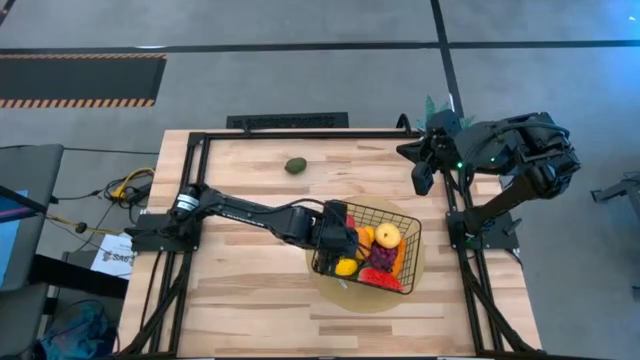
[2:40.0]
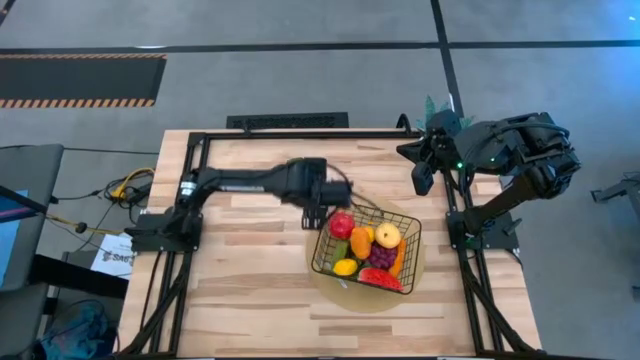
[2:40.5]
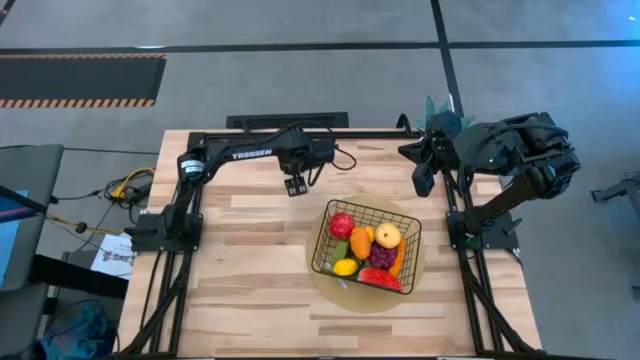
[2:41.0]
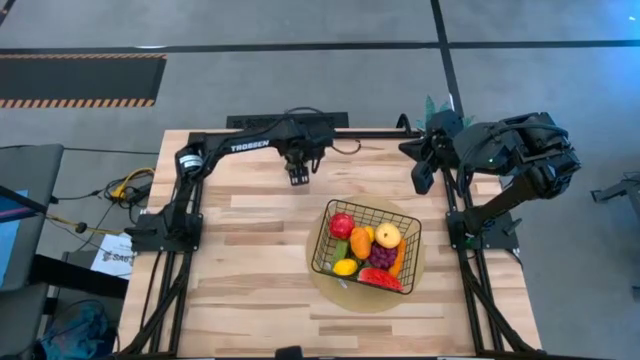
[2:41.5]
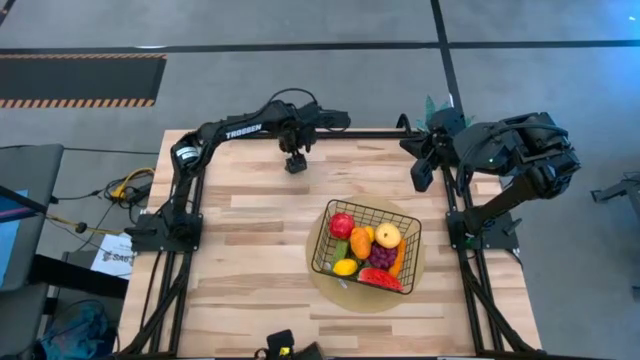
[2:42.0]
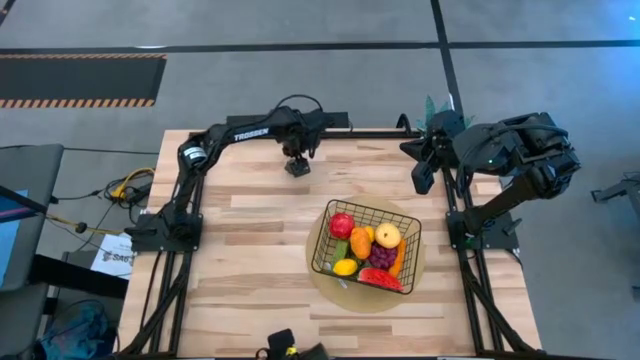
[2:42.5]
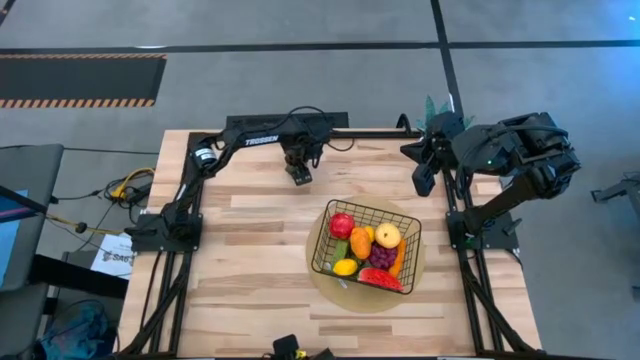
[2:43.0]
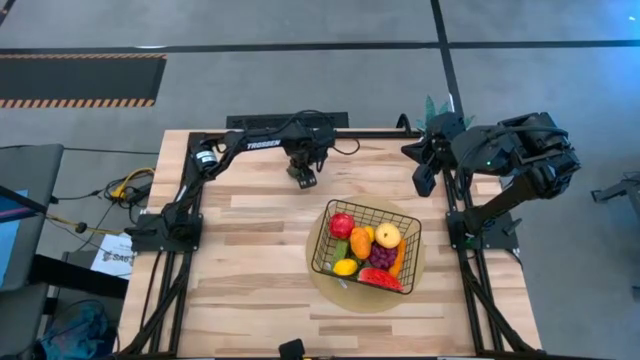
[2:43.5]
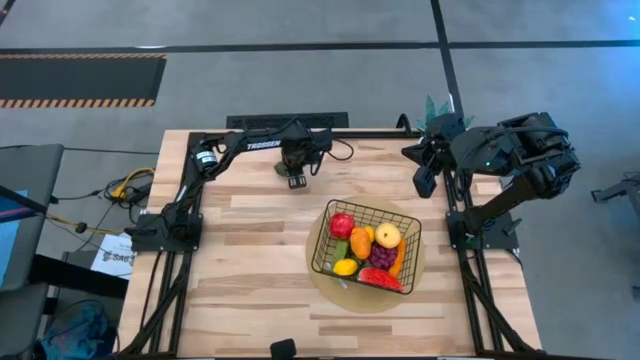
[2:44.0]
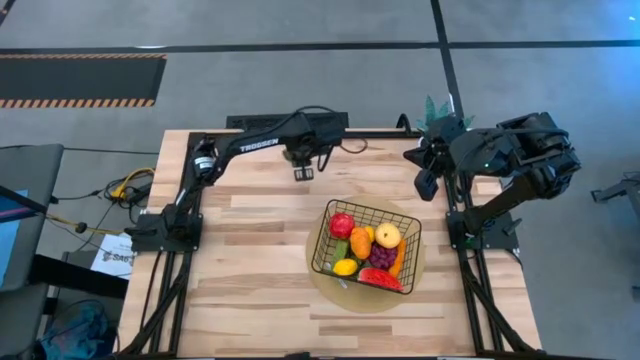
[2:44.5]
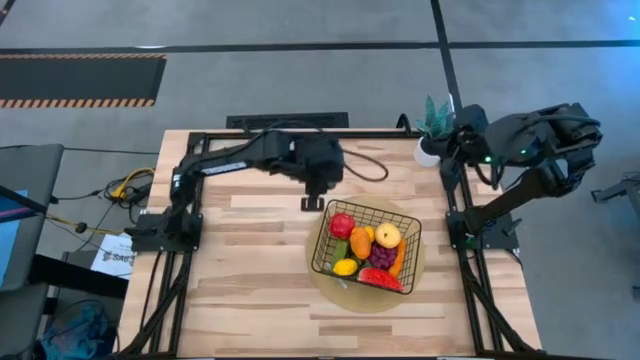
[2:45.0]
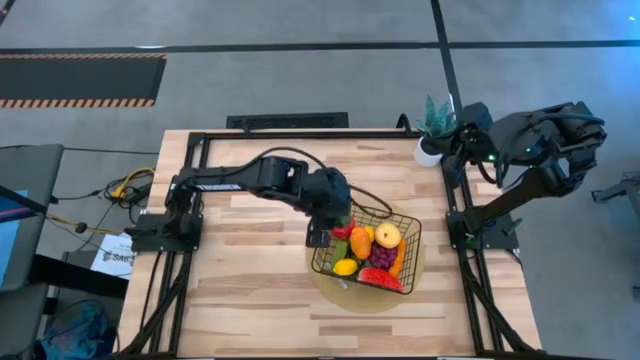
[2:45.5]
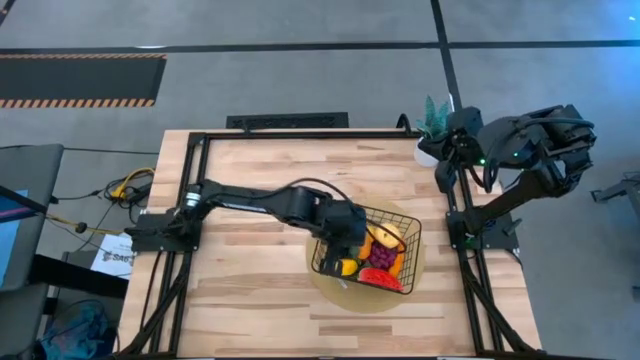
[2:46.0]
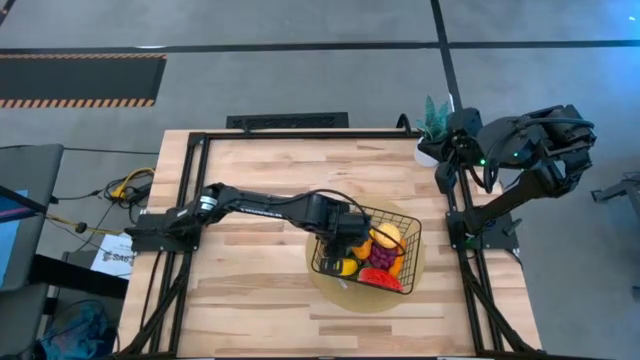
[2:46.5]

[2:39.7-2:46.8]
Task: Build produce basket
Put the lime into the mesh basket

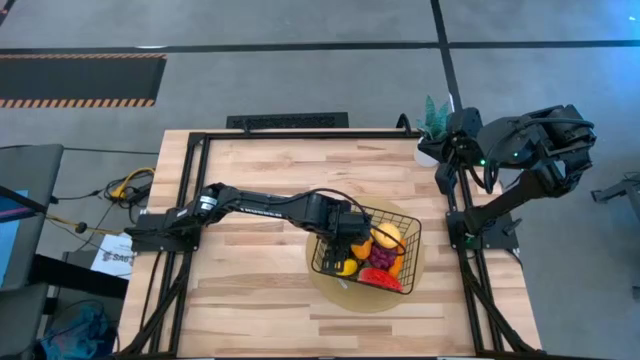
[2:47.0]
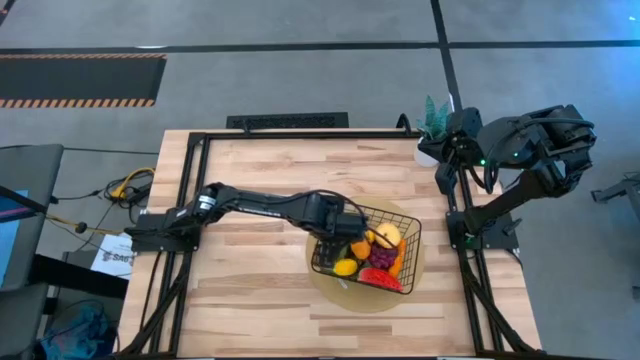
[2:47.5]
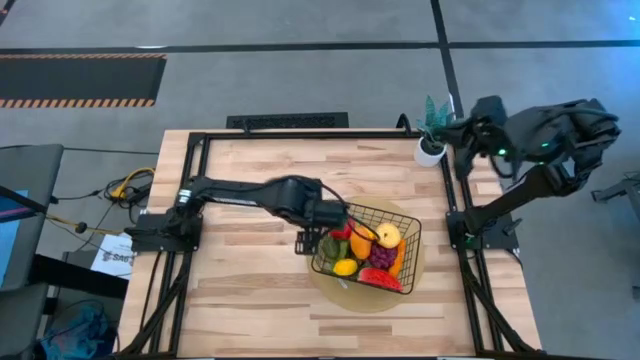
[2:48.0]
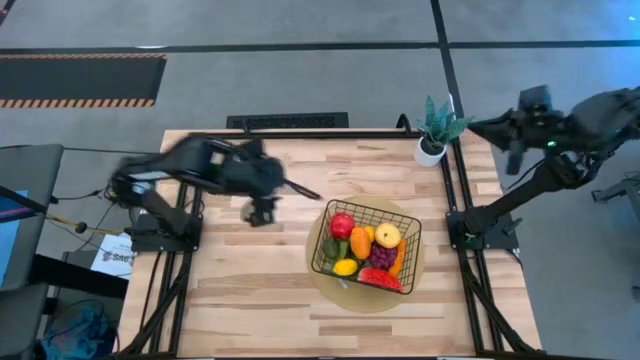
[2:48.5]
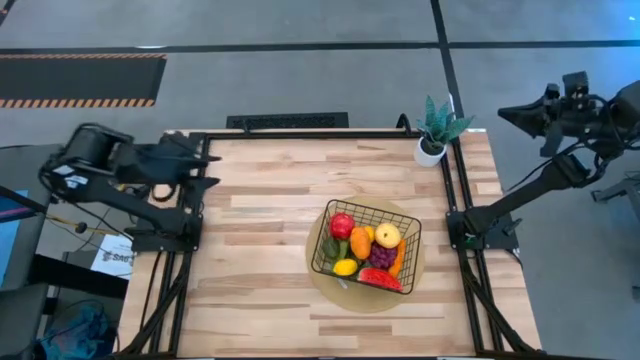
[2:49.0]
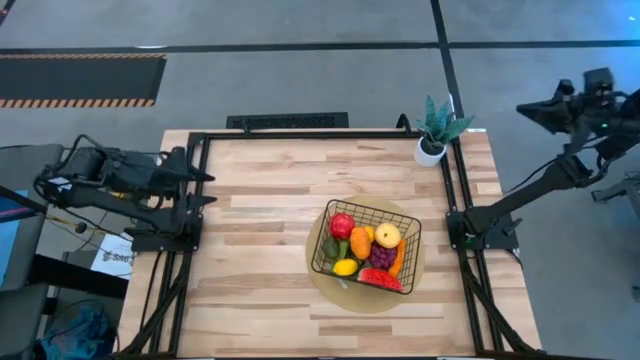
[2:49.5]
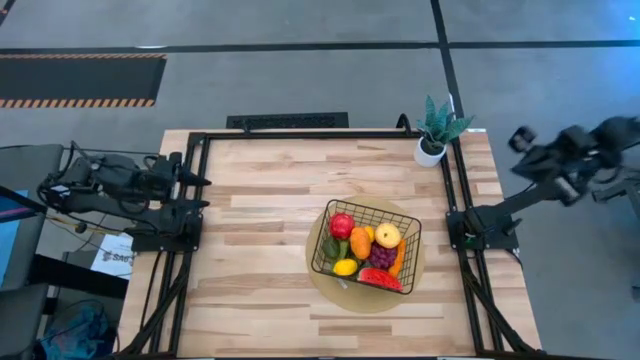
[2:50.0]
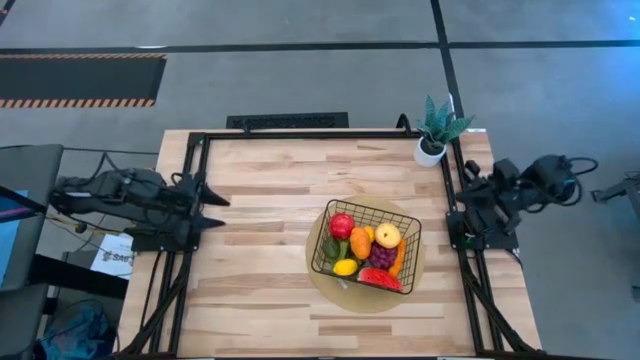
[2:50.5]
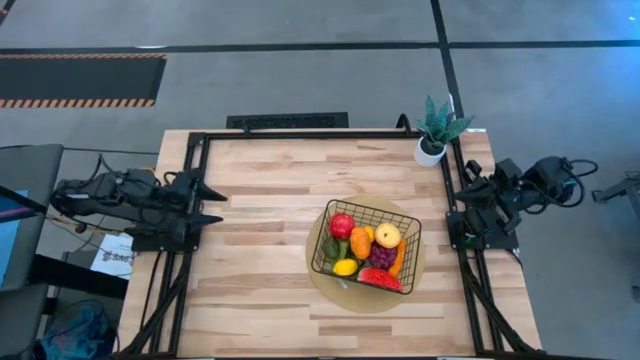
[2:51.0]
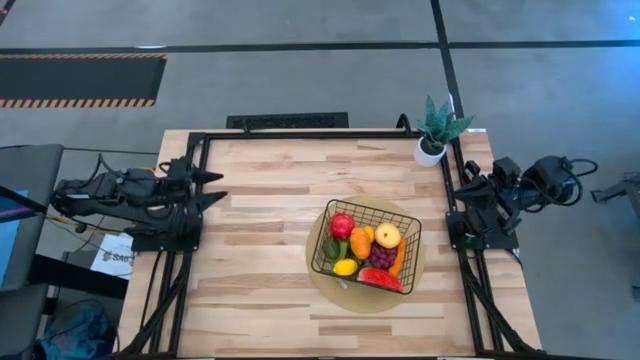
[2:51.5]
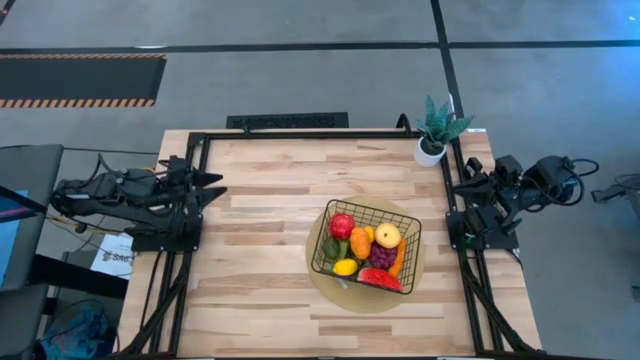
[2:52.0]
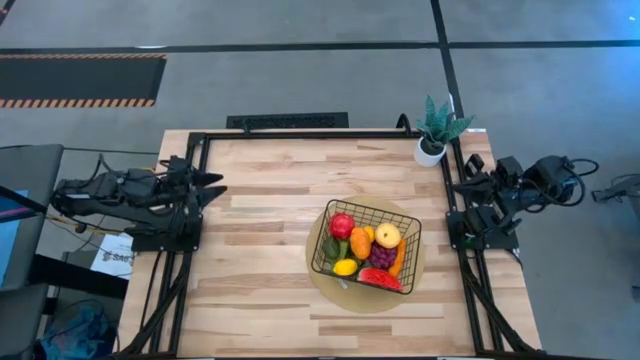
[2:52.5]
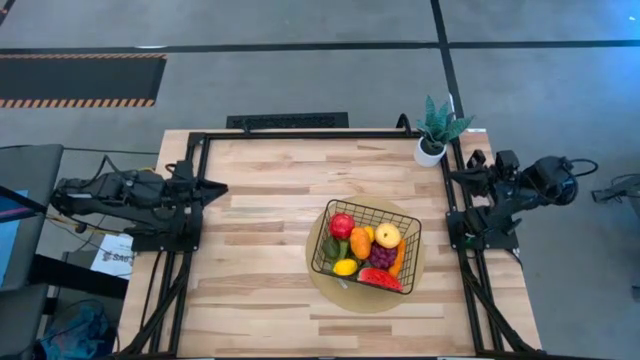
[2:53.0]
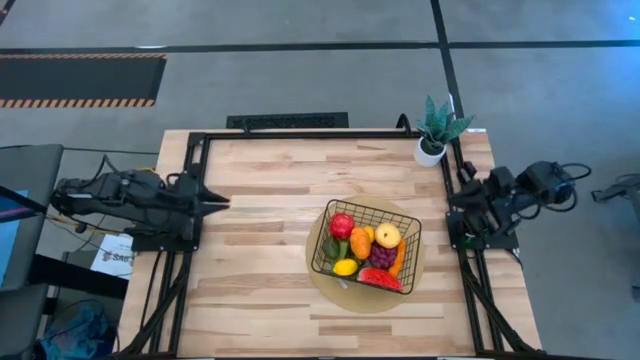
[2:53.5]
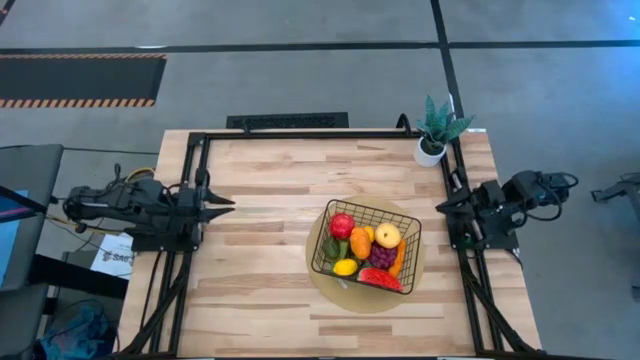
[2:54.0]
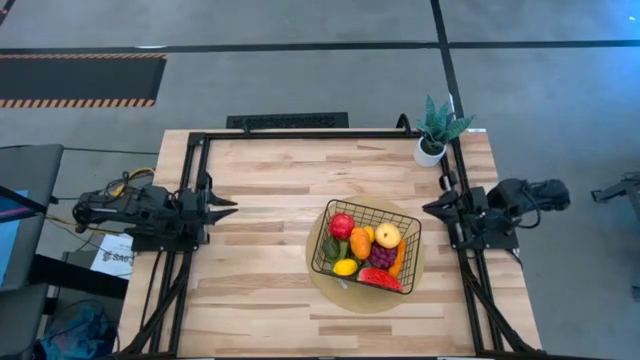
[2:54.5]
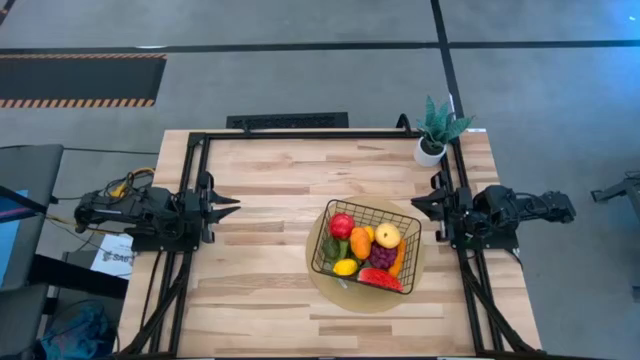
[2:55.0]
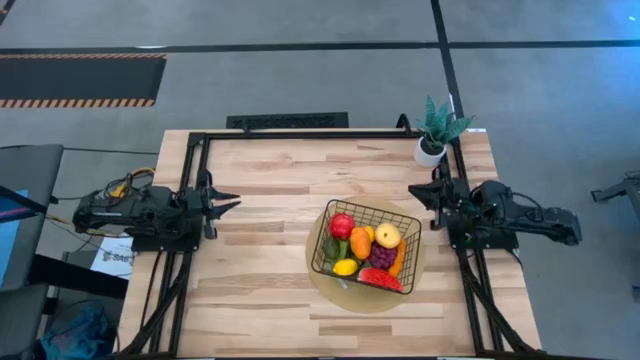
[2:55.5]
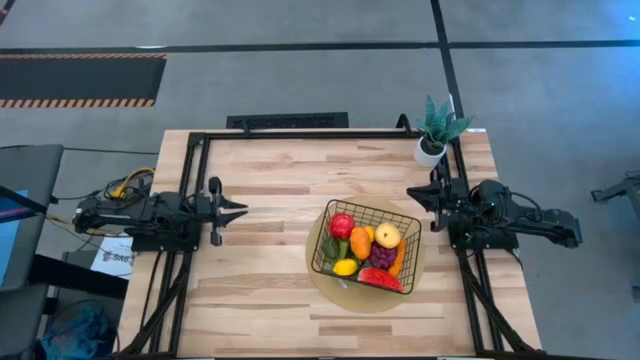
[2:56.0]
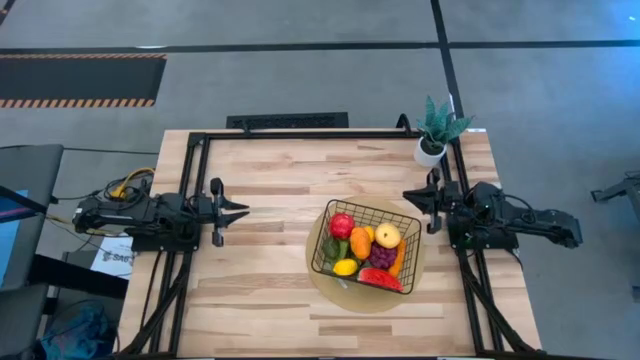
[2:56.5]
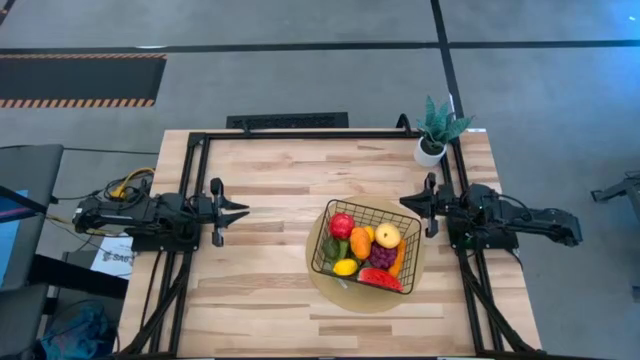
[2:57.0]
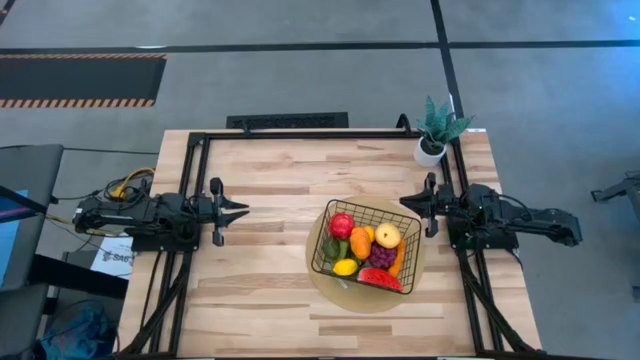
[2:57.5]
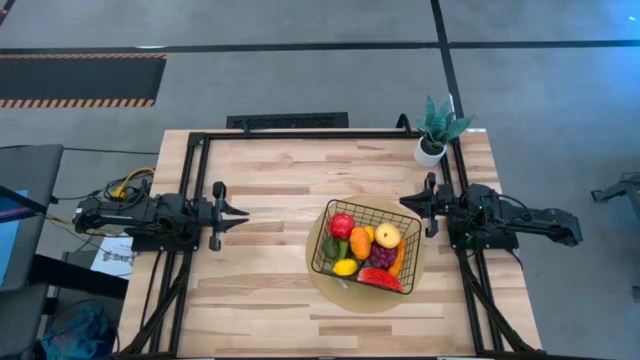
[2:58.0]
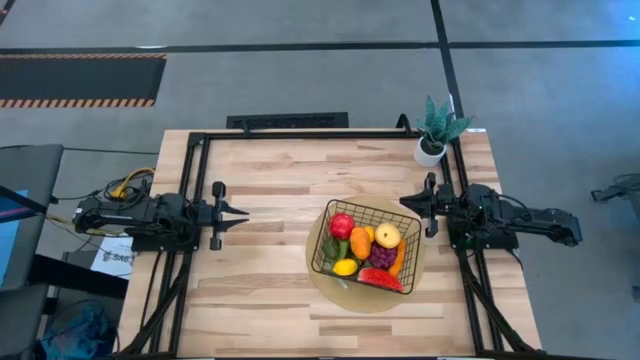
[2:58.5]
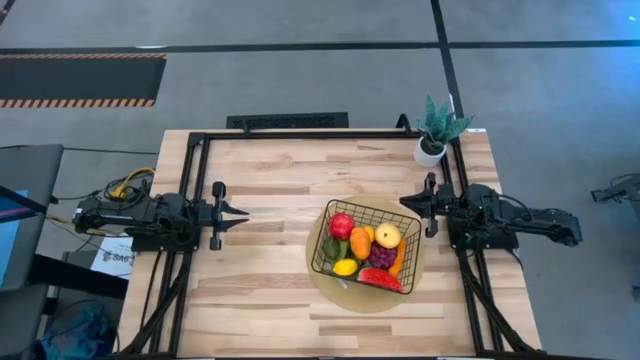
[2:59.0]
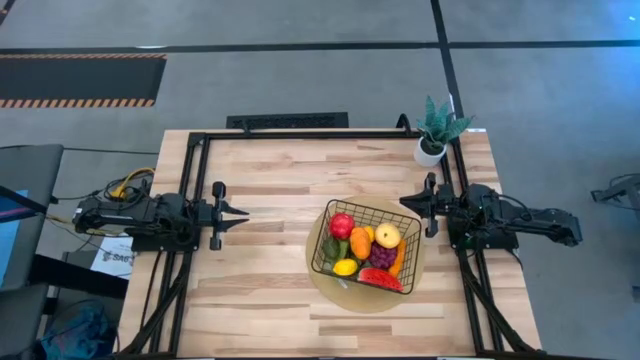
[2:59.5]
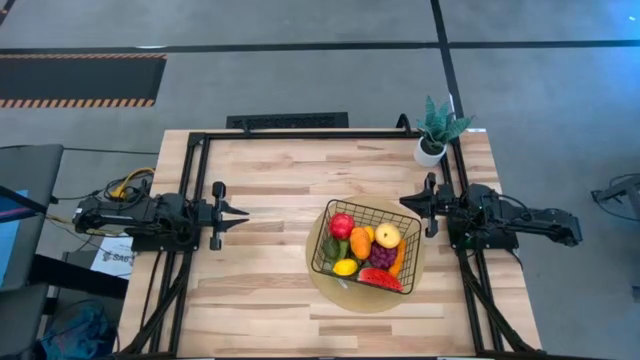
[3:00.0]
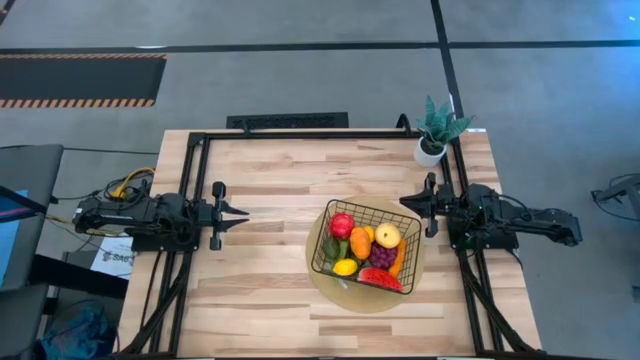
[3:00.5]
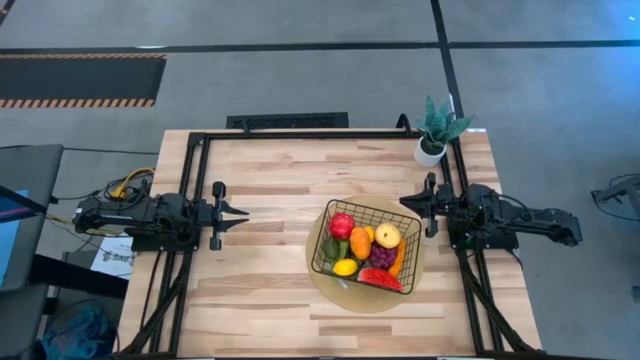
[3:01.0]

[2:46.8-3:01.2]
Return to Home Position
